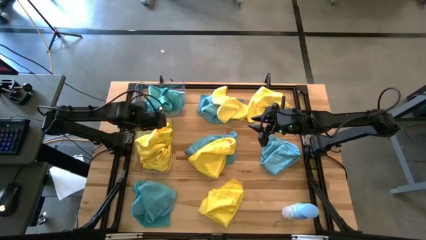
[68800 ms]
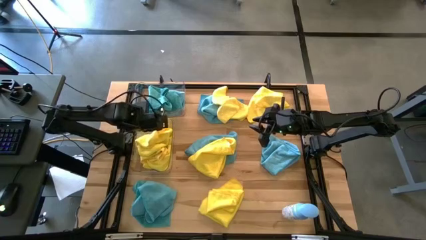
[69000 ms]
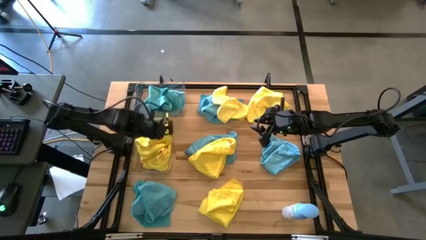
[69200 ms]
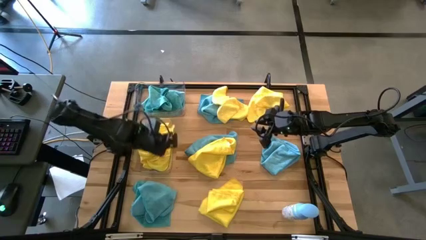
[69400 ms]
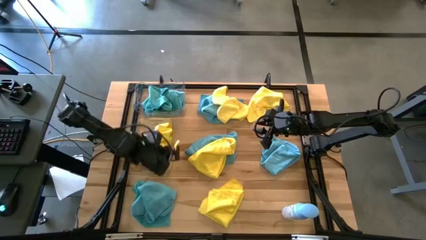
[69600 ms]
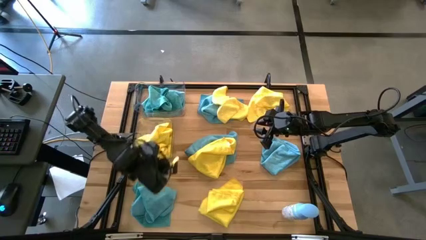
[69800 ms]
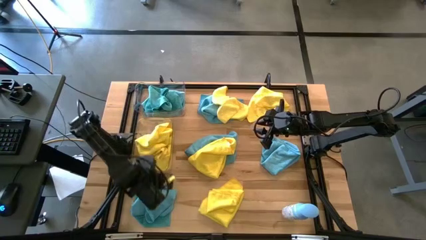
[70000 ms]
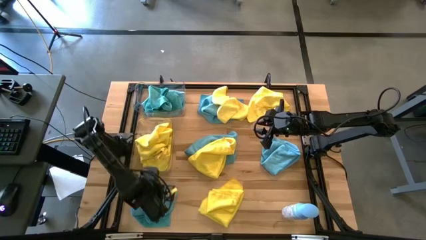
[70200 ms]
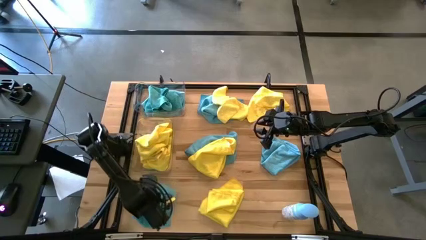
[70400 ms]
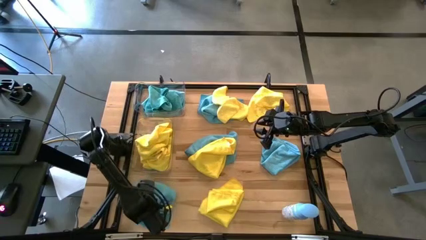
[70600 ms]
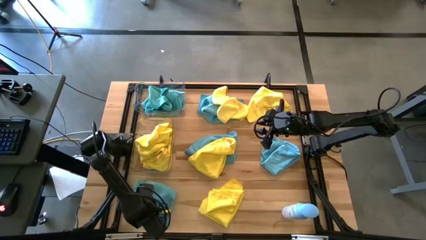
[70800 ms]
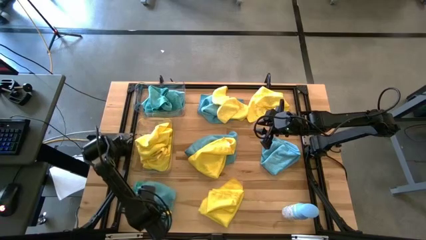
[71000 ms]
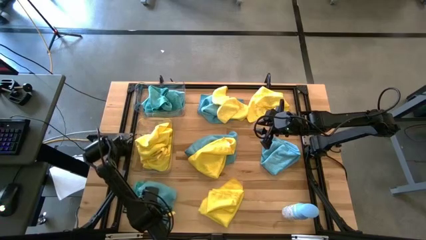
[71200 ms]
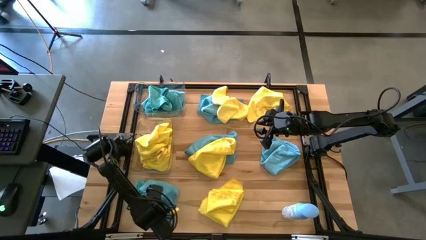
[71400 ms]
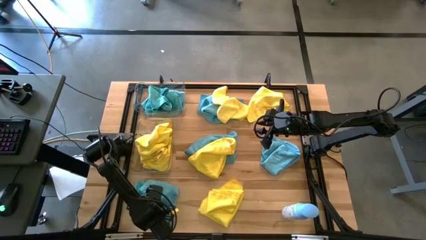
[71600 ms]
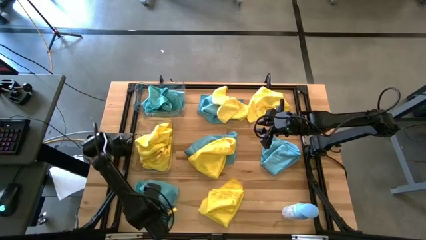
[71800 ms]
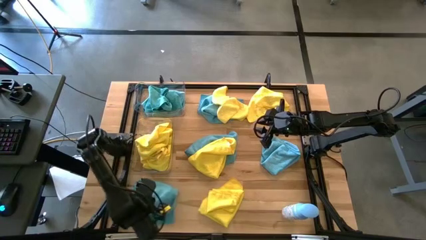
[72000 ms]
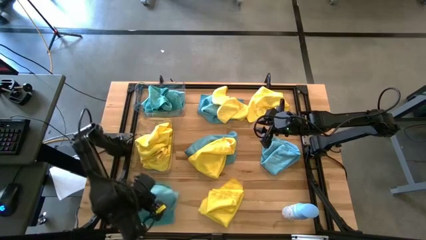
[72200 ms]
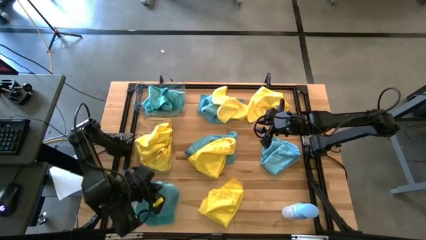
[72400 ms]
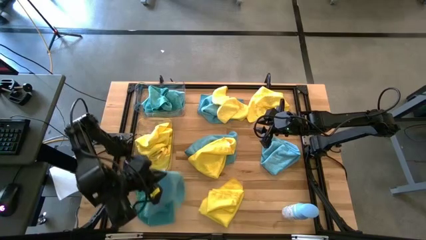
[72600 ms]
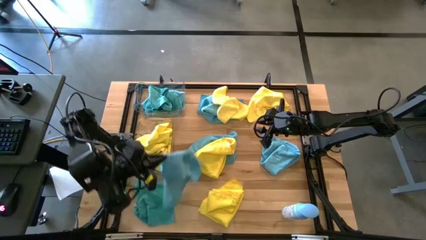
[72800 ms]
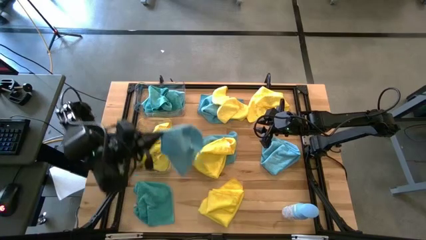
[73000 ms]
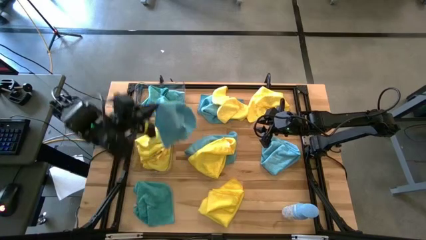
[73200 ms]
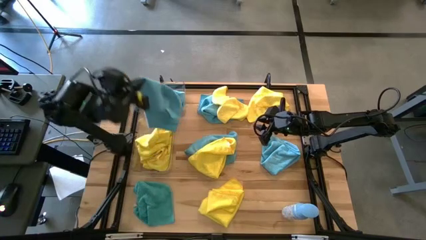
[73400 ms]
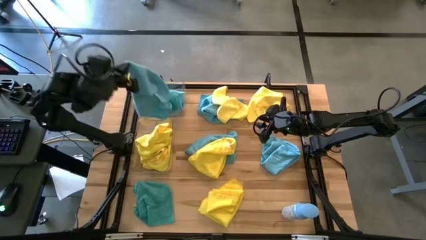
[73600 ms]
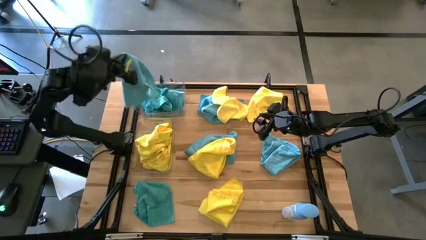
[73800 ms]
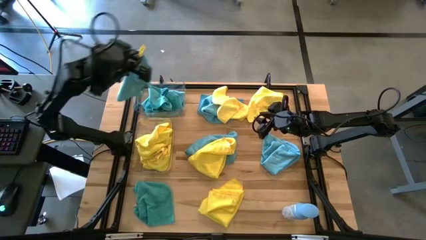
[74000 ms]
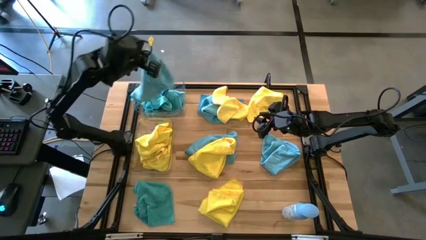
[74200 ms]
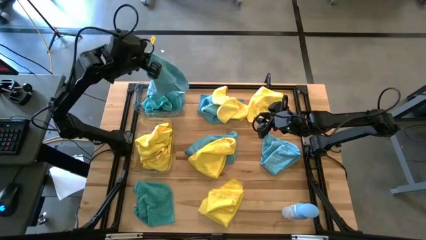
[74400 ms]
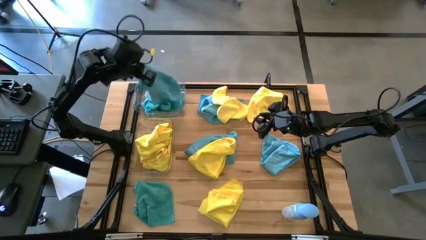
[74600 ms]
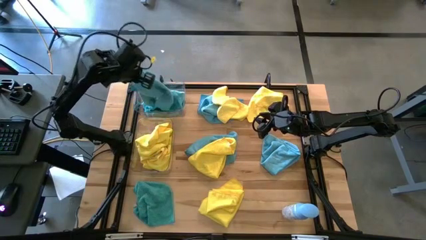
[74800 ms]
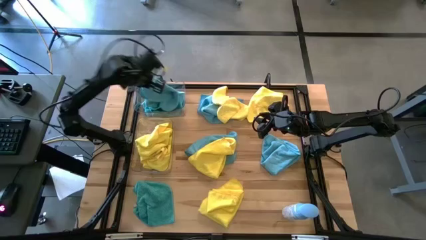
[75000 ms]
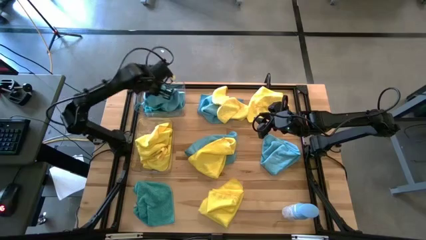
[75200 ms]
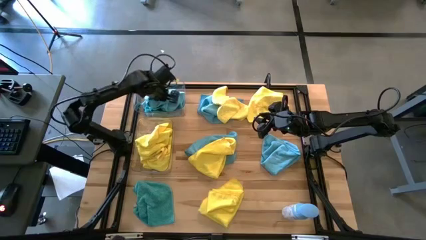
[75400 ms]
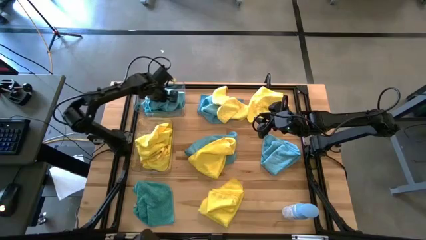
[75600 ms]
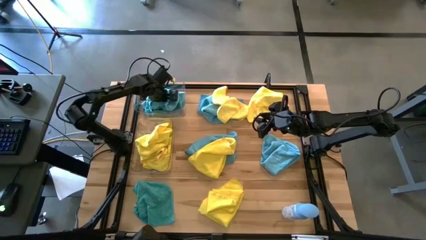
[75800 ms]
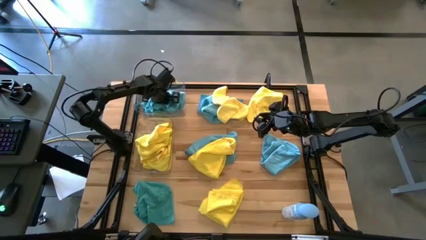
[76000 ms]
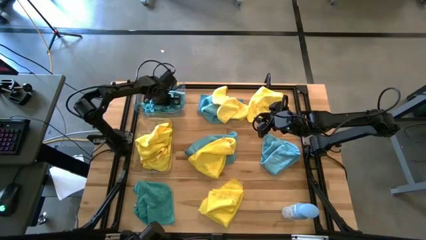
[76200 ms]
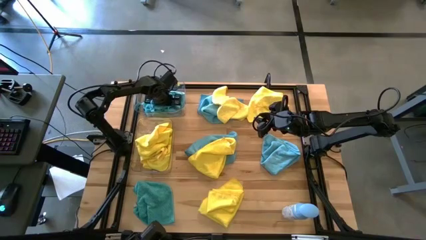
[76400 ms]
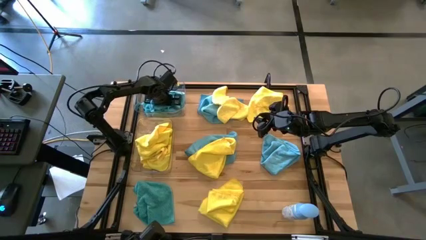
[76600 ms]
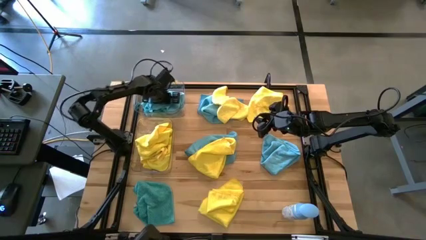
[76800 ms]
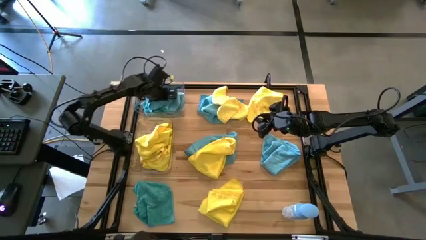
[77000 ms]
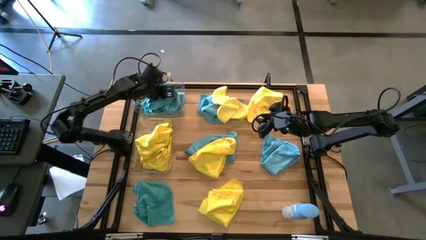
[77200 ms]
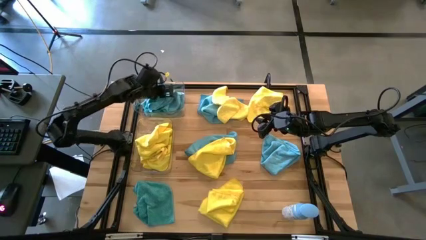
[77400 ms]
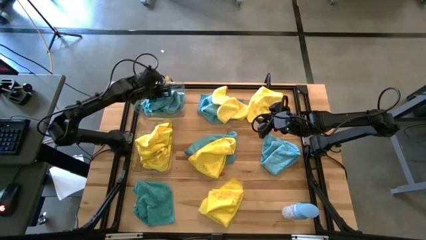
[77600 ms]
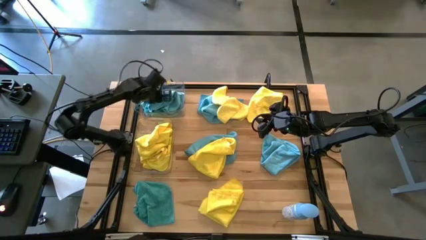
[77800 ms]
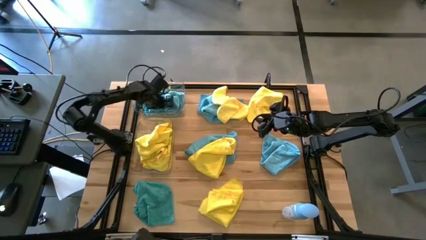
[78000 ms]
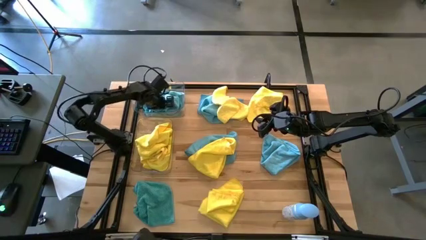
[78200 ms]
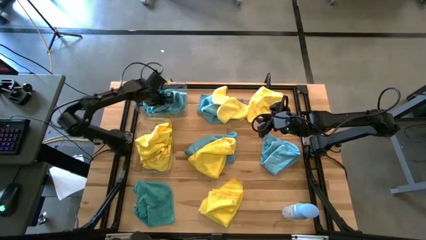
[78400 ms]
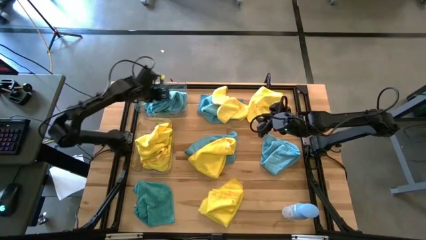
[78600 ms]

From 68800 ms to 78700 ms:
Task: Sort microfiber towel by color & place in baskets
Put the blue microfiber cloth into the top transparent bin
